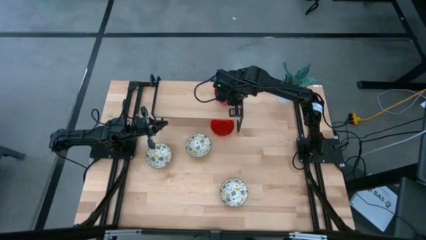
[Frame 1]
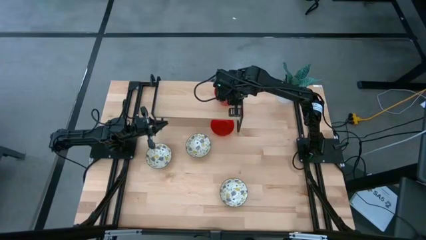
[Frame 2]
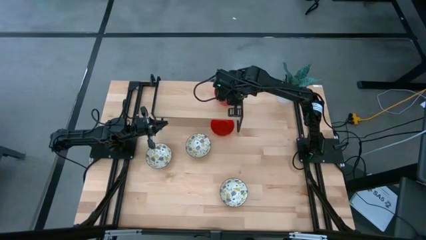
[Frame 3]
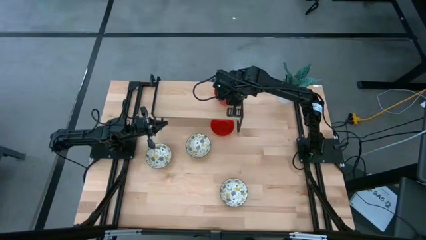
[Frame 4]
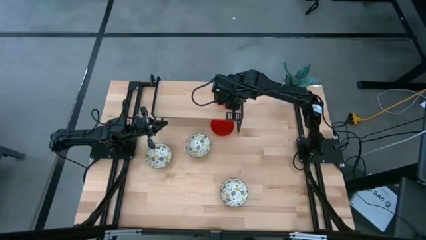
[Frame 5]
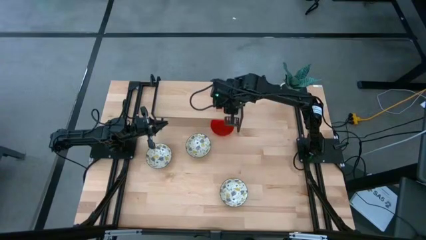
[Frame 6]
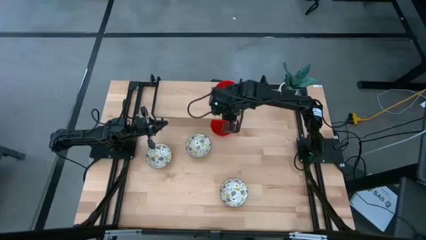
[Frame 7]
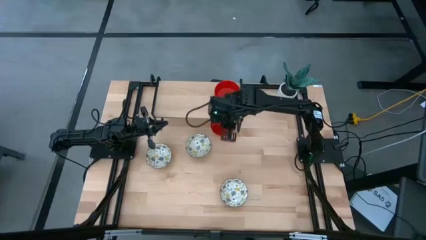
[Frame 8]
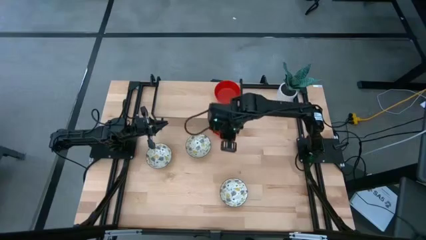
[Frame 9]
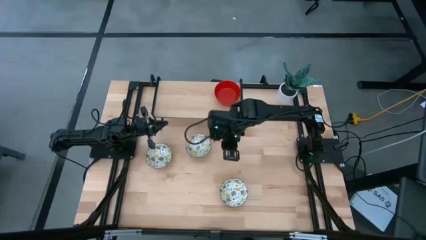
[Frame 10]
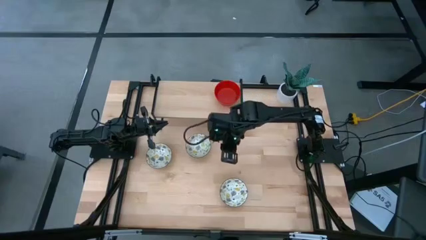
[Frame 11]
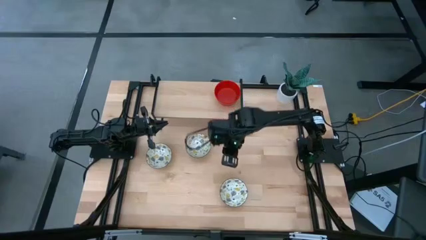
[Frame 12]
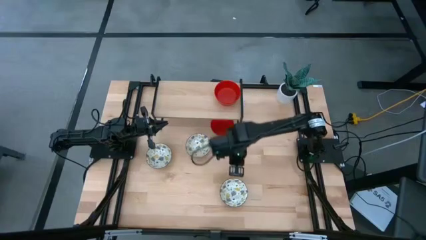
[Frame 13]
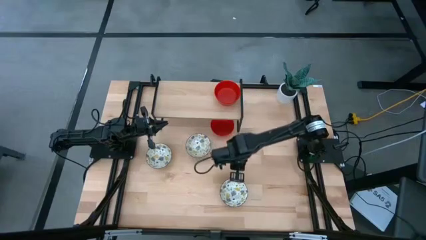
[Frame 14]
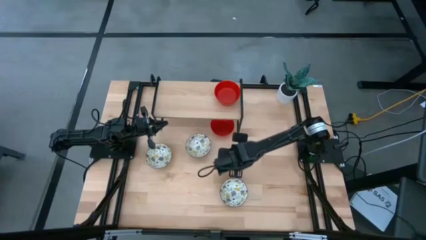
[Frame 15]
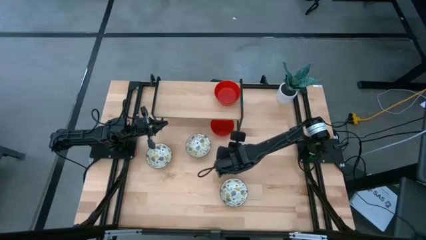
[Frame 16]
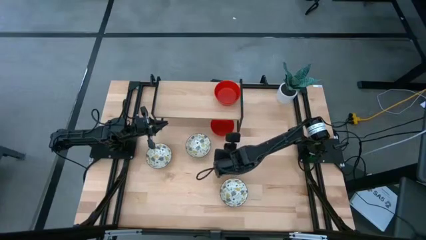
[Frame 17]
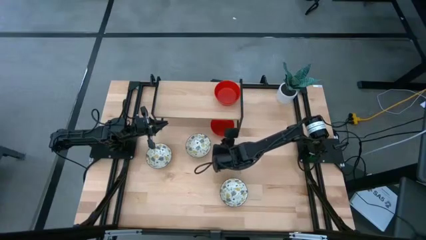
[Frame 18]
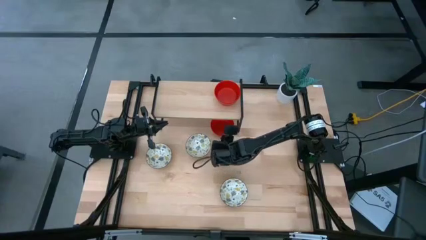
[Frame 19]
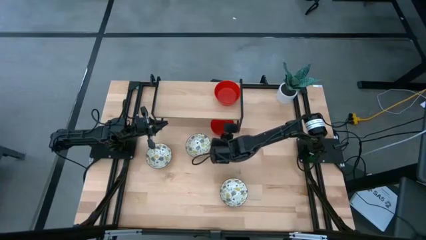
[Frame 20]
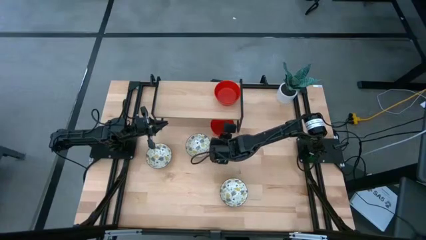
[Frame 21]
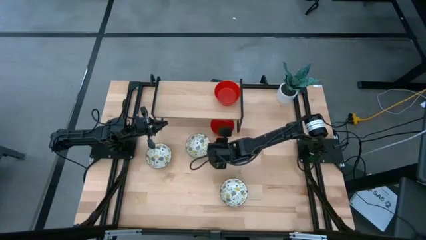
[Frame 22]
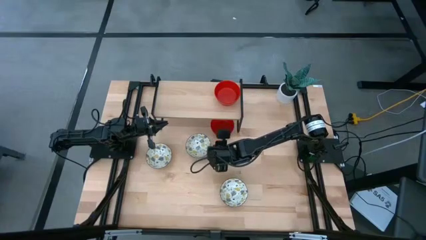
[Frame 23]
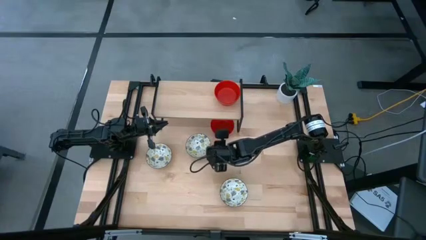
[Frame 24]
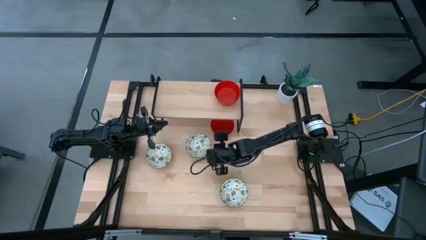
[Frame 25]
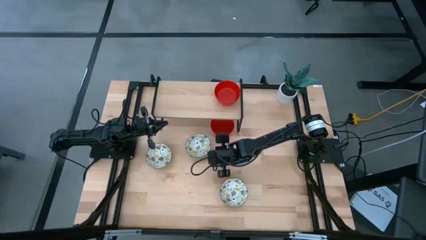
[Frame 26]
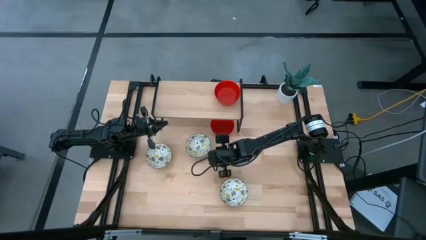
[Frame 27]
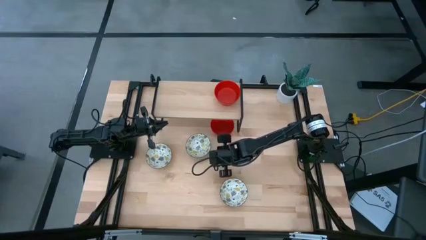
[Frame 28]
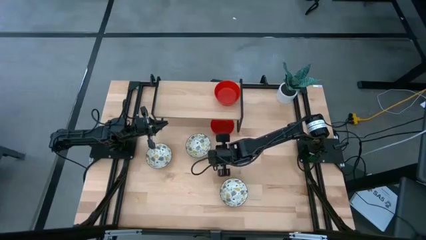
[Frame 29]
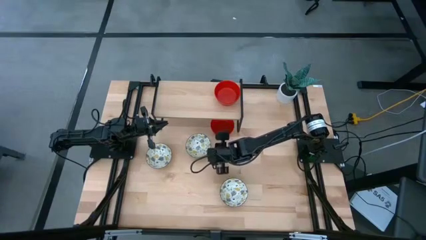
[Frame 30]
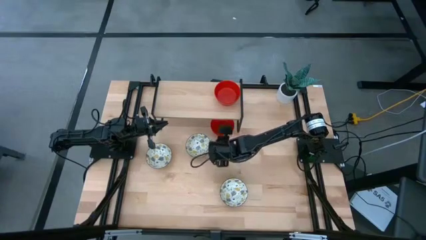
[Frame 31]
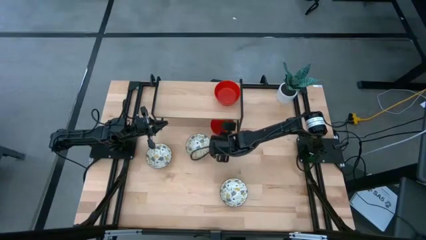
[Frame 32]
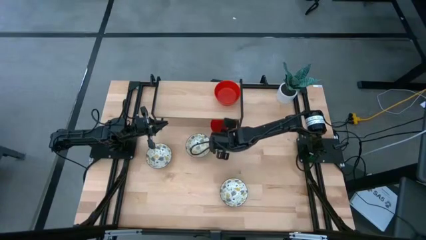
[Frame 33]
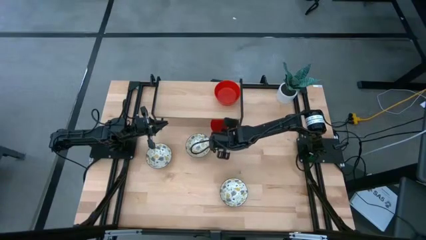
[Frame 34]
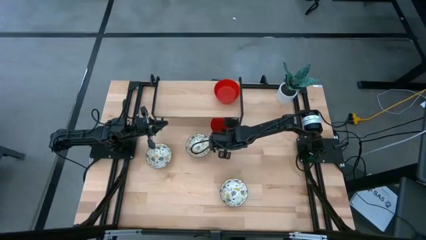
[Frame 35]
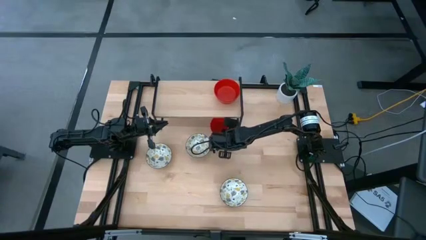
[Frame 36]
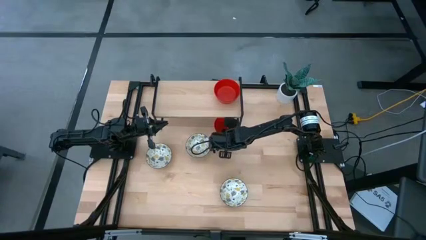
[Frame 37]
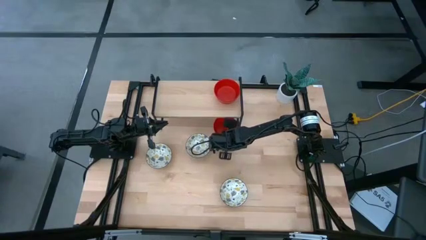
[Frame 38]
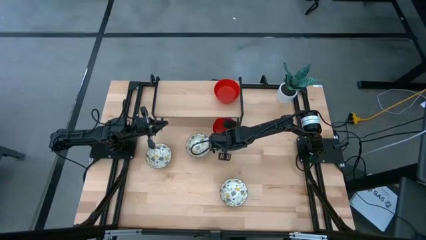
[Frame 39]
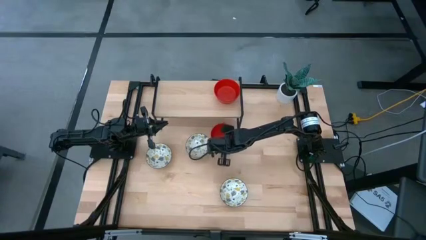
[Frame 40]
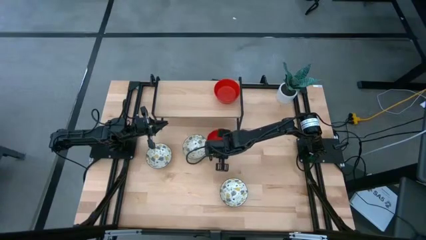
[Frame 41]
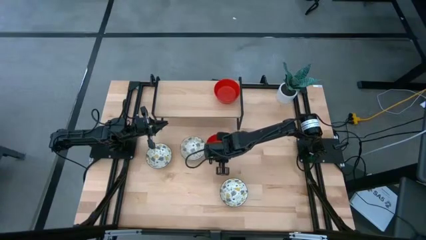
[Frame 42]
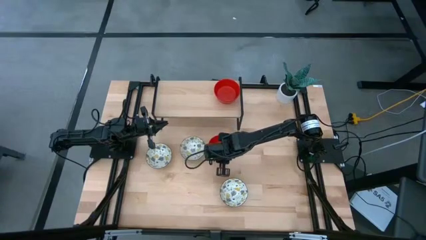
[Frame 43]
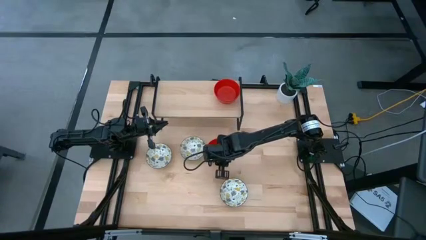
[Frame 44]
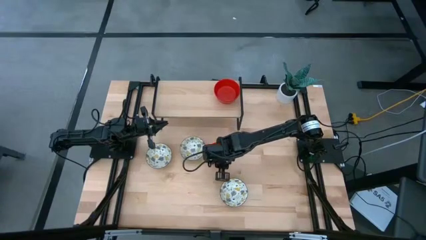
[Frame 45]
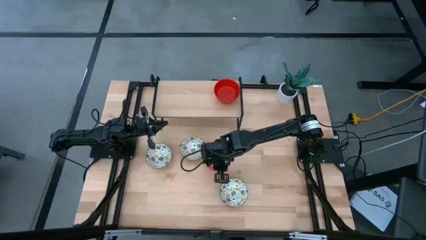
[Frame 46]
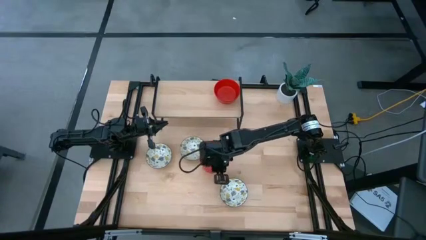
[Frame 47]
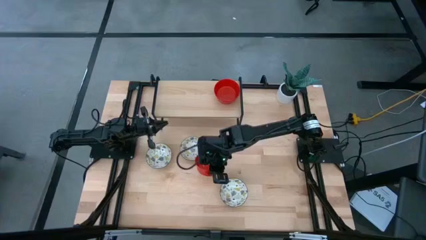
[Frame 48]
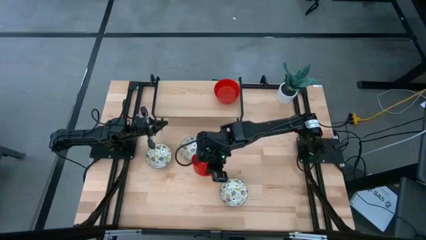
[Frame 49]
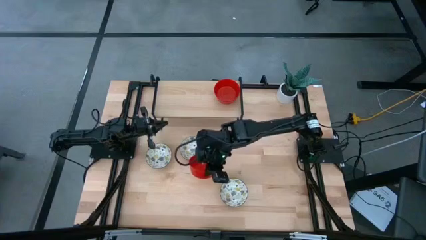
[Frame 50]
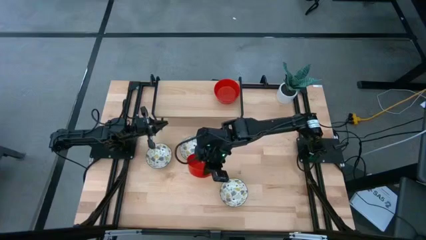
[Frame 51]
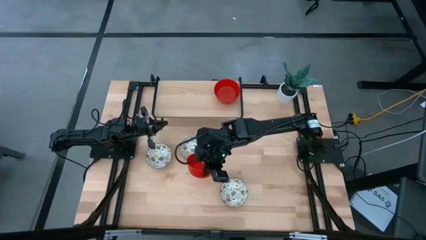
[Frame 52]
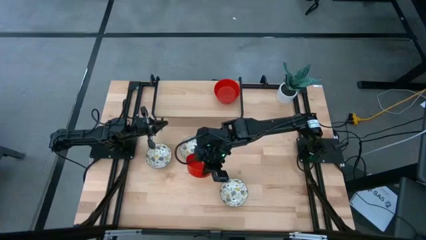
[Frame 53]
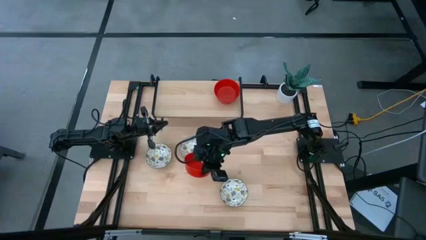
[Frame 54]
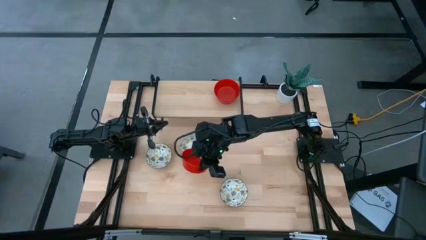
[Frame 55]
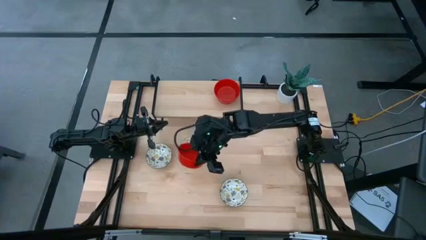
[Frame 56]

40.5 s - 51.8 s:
Task: Pick & Place Mini bowls
Stack the red bowl on the red bowl on the shelf

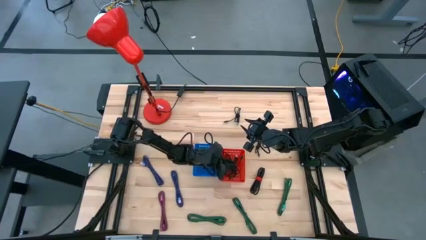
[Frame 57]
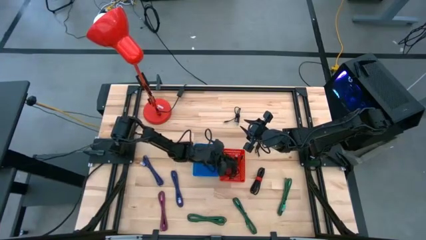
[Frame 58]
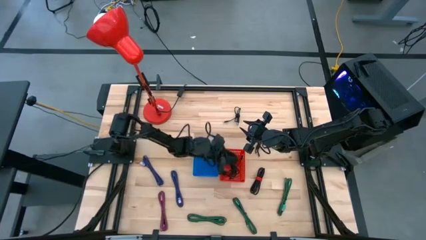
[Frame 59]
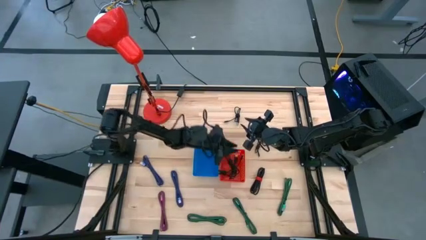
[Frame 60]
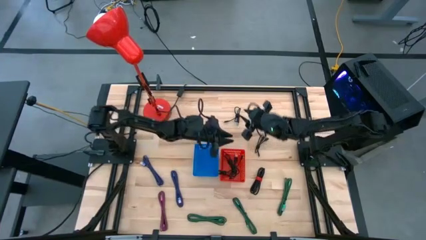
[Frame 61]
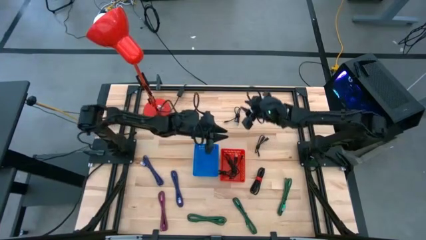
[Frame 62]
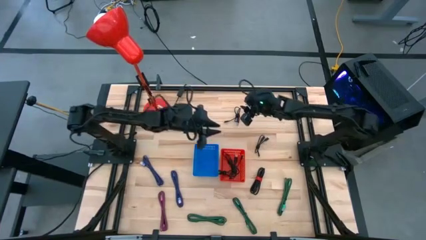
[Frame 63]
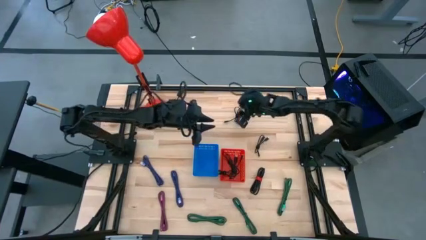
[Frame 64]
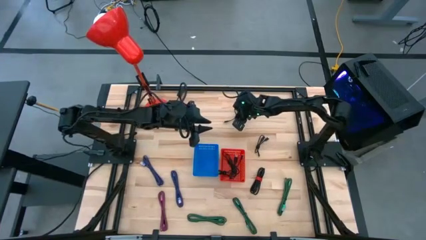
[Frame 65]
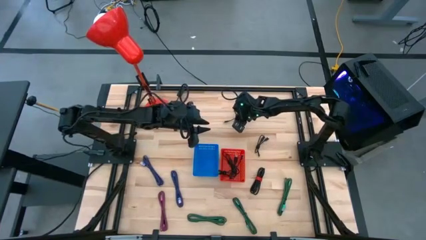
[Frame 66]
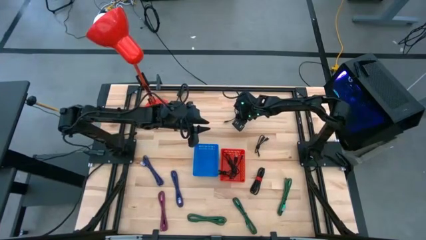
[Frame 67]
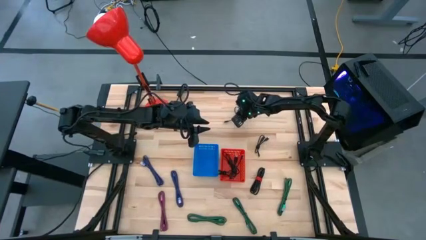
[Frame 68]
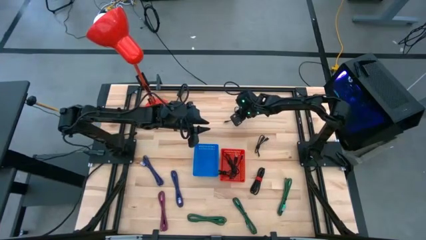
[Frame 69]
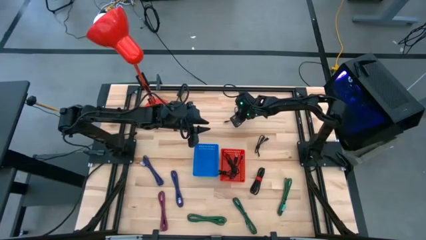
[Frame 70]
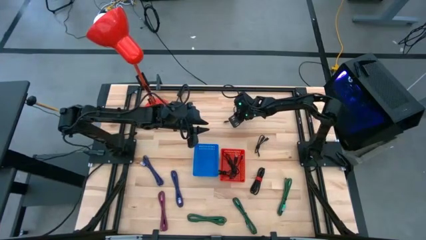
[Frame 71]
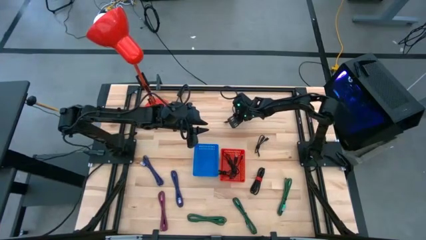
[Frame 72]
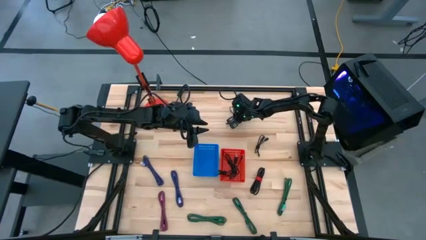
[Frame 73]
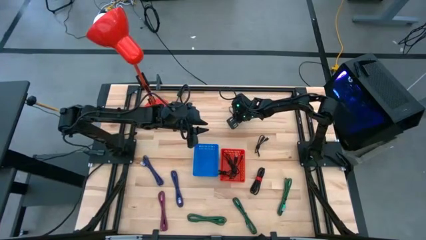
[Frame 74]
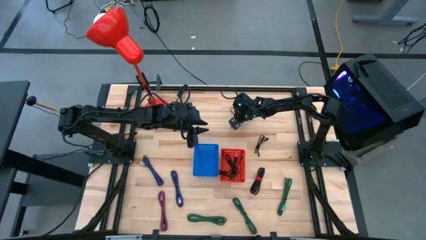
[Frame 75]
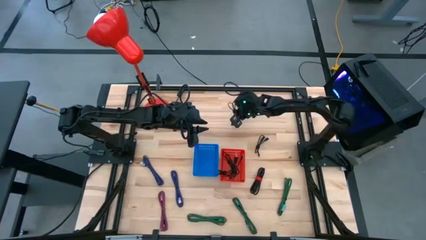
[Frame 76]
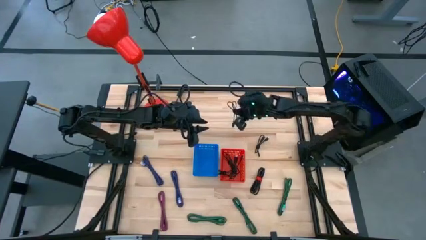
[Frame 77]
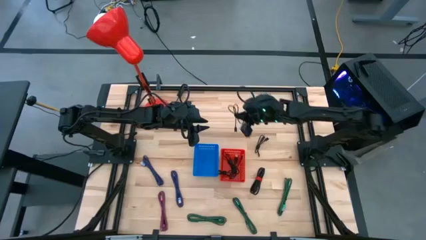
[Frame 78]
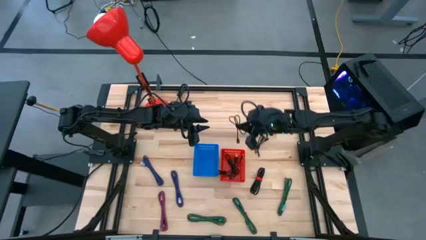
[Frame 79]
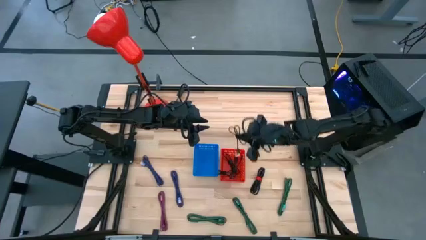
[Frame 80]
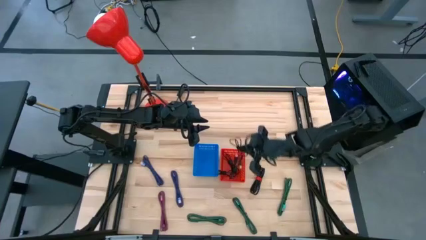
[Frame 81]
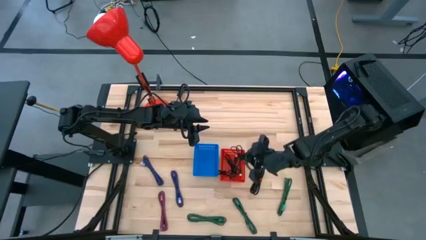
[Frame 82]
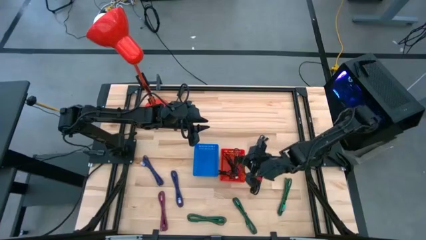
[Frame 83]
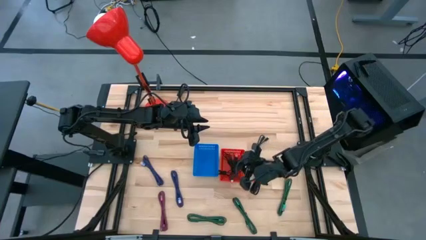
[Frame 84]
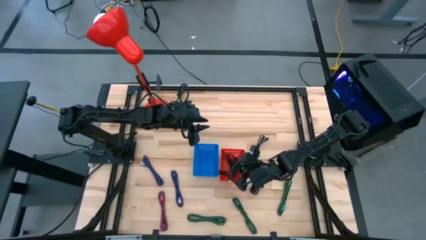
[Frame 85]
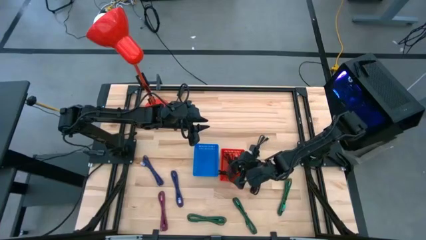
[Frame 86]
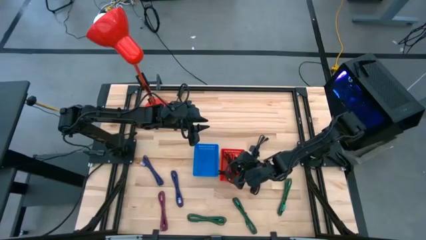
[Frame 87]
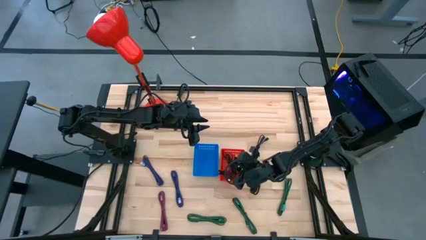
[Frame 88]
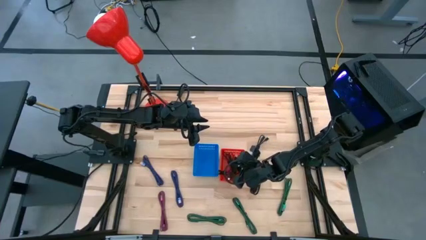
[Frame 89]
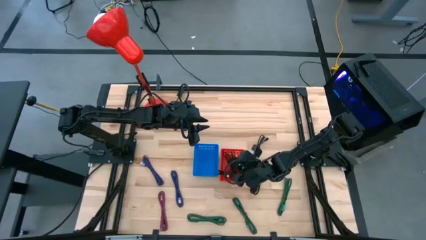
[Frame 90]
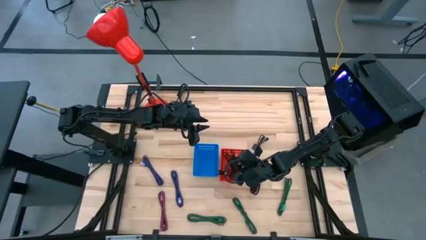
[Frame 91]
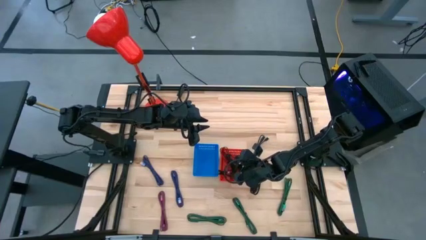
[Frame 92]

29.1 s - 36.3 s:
Task: Pick & Place USB Port
Put the black charger cable into the red bin
